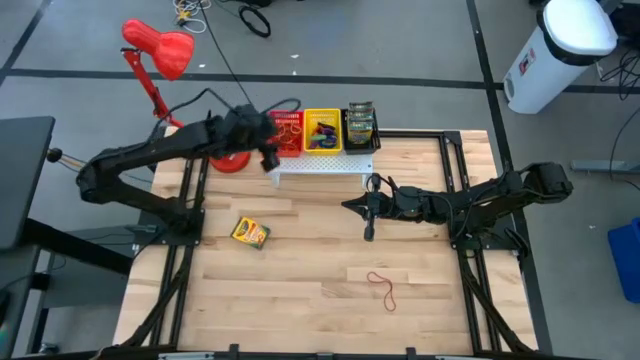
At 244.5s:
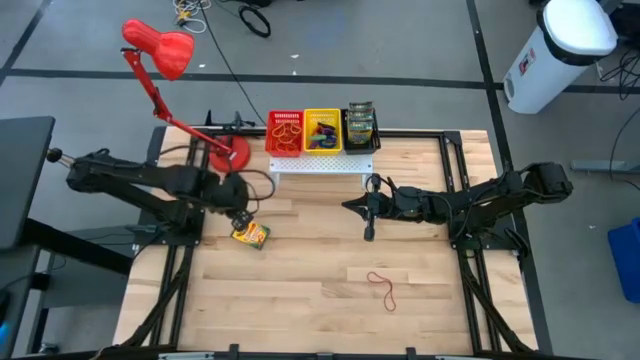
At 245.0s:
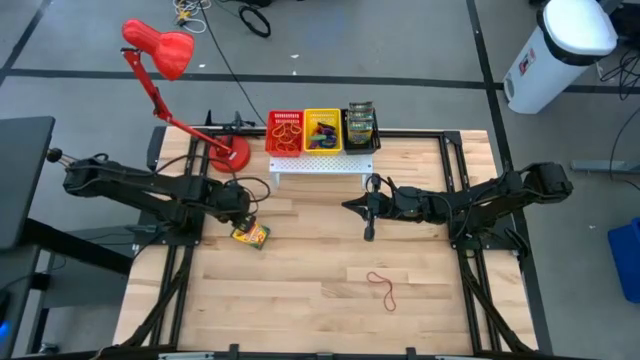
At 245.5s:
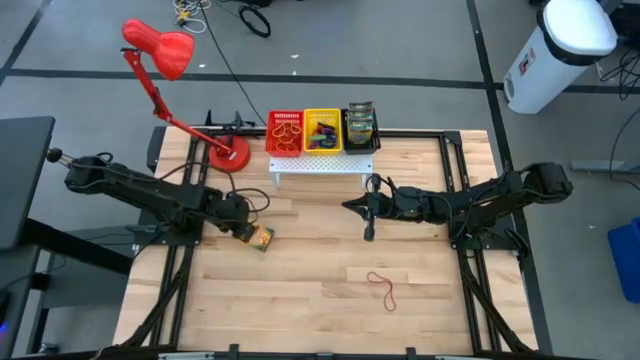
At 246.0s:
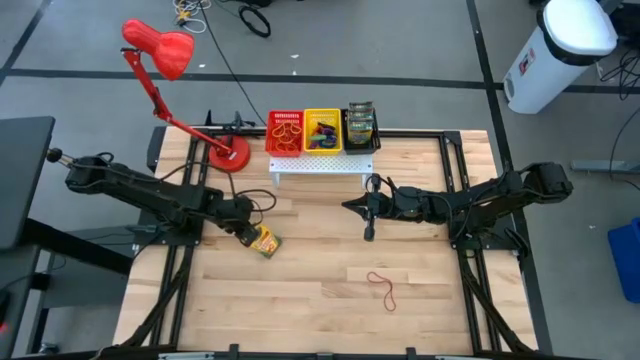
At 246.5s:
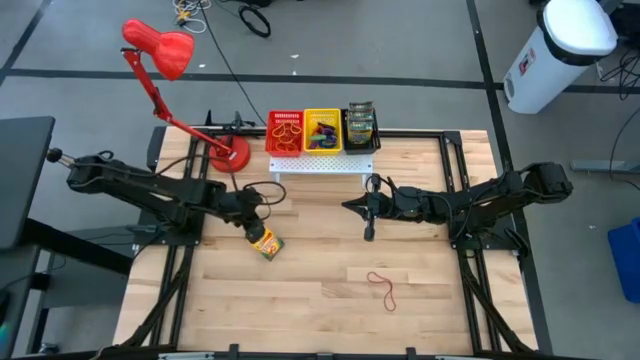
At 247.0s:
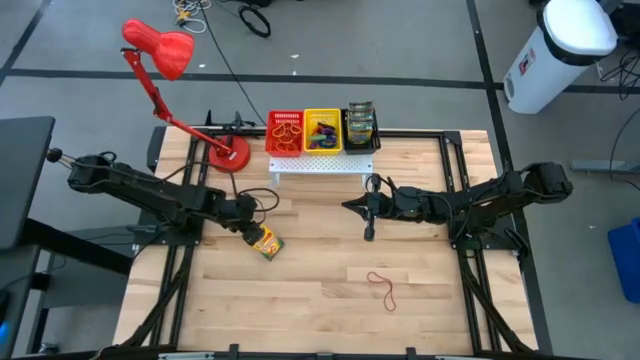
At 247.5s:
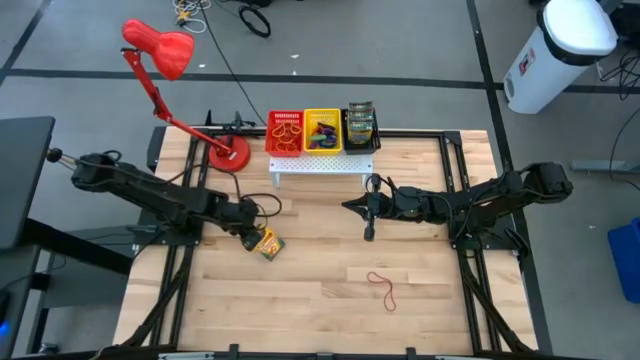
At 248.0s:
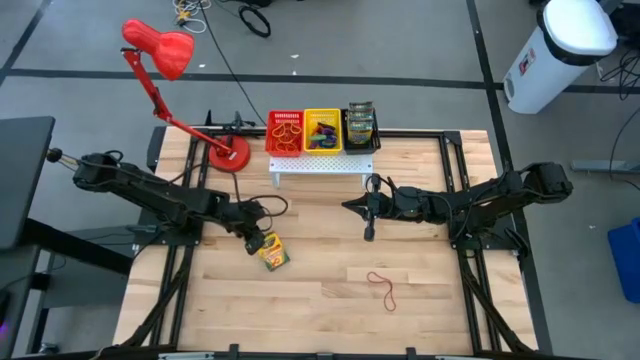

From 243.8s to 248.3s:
Task: Pick & Place Office Desk Supplies
Put the yellow crayon box into the black bin on the shelf

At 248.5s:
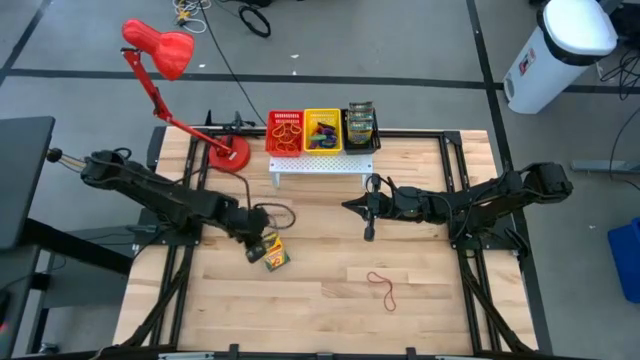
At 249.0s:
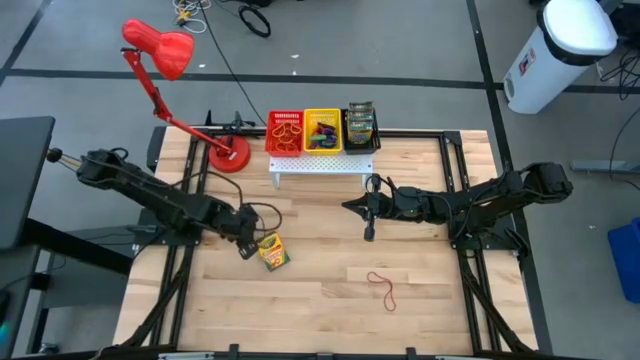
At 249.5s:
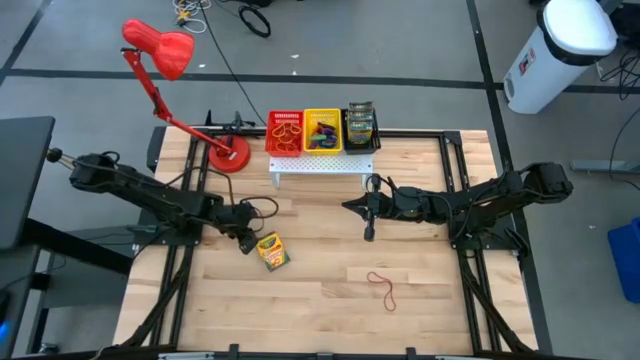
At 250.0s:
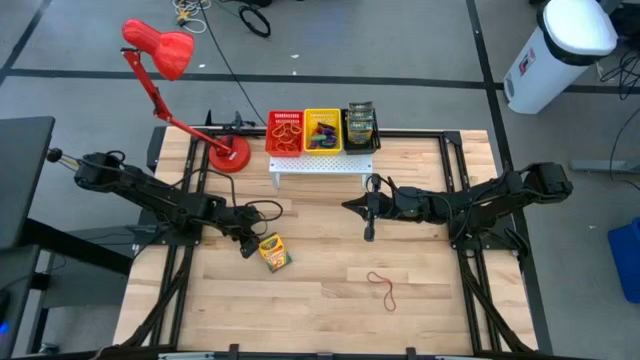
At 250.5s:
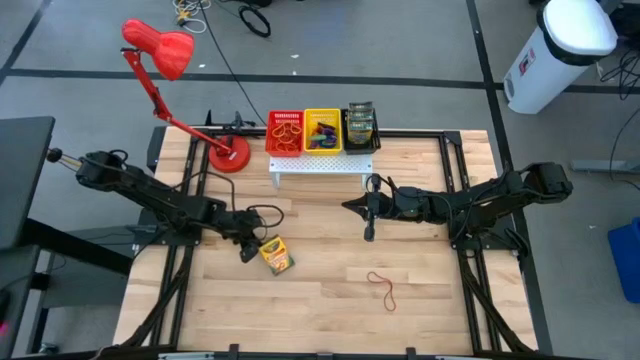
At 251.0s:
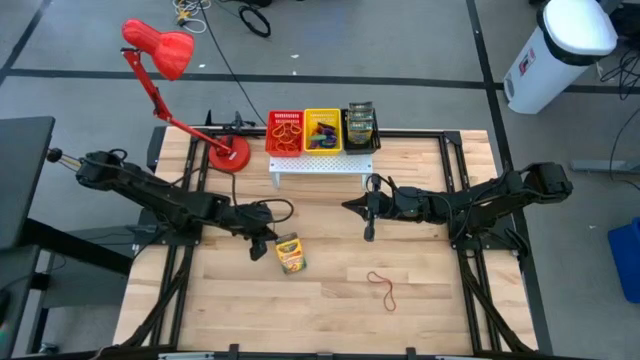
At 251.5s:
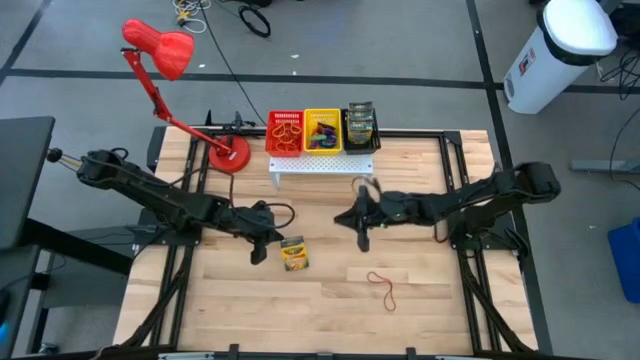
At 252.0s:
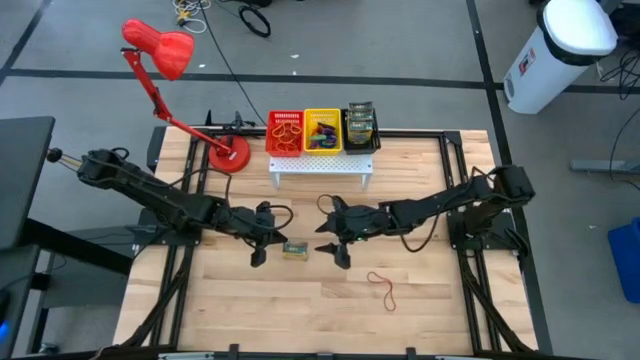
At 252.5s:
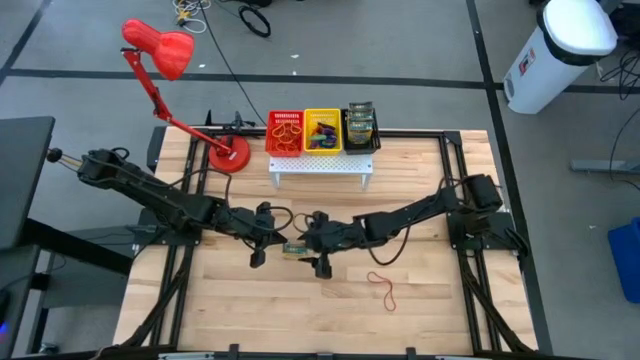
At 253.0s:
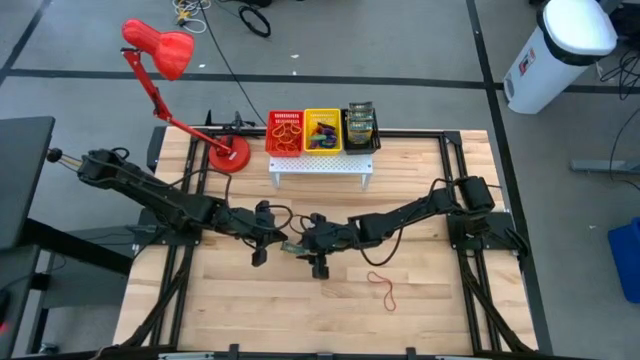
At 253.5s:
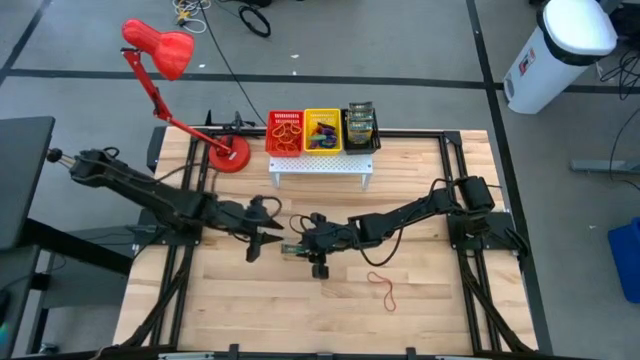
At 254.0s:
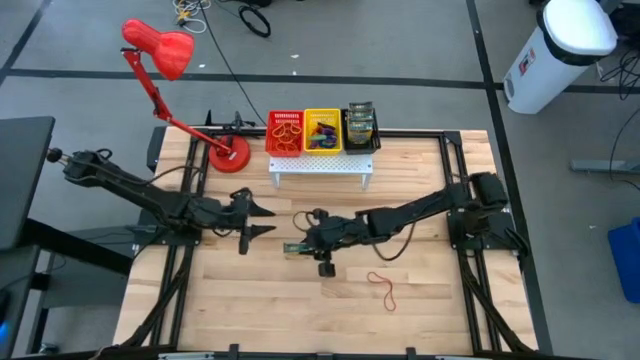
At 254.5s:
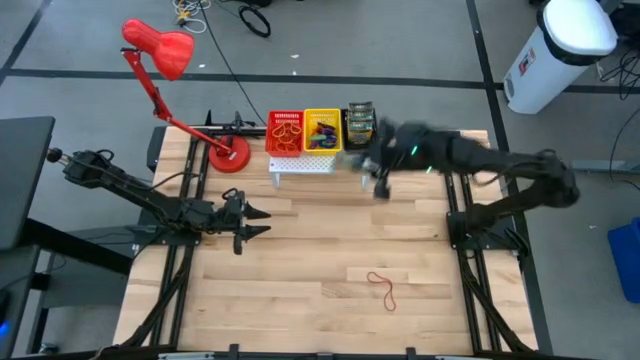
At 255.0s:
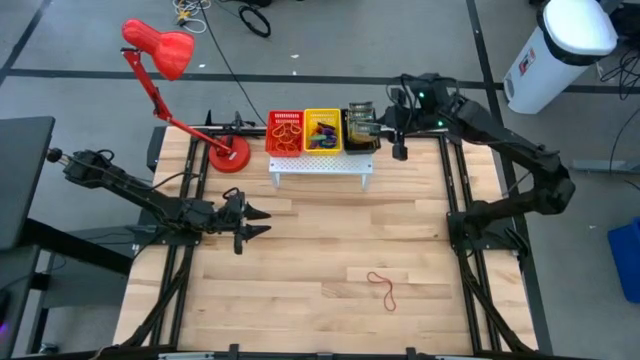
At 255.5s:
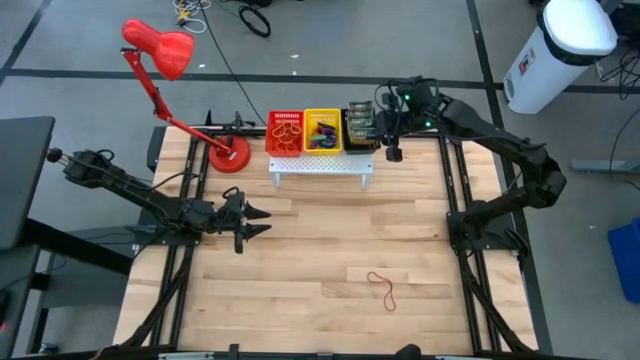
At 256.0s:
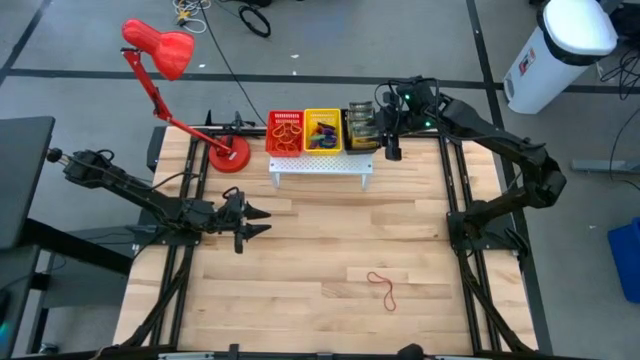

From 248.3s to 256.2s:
Put the yellow crayon box into the black bin on the shelf

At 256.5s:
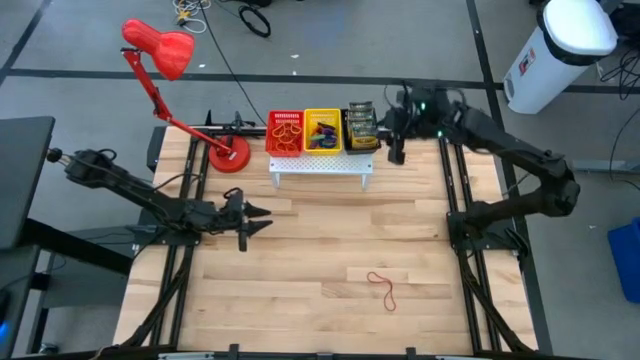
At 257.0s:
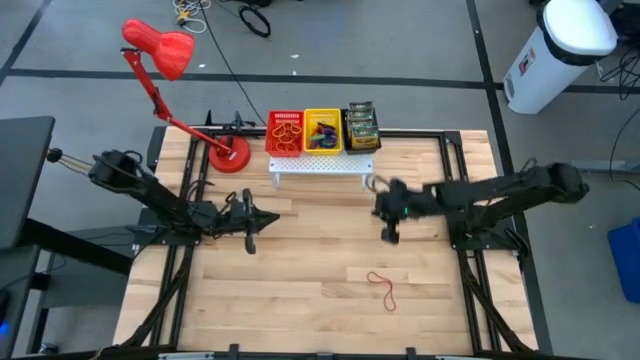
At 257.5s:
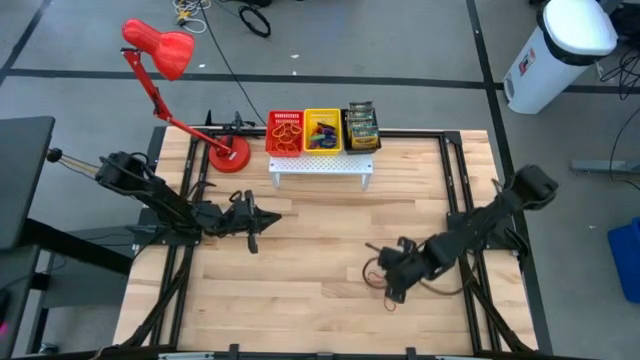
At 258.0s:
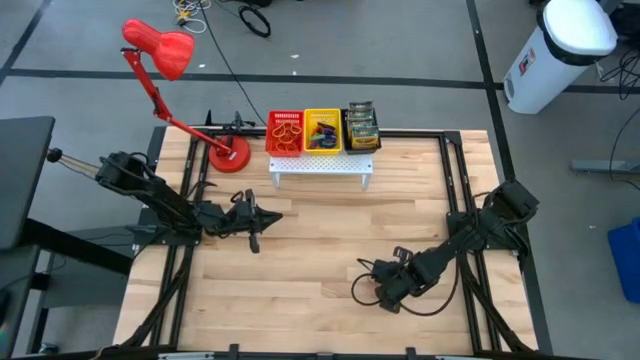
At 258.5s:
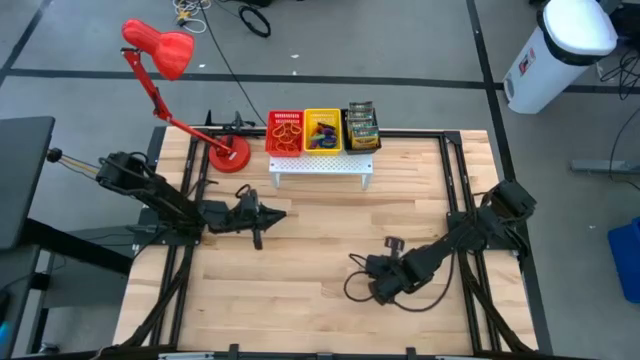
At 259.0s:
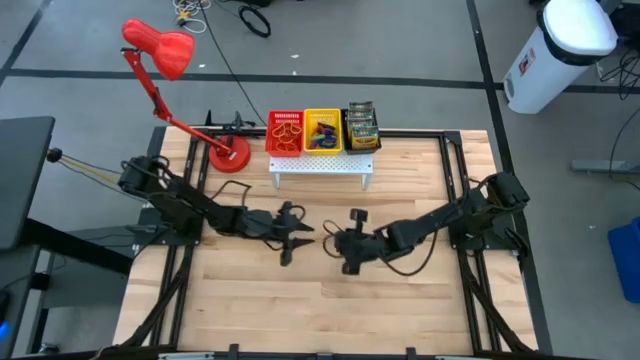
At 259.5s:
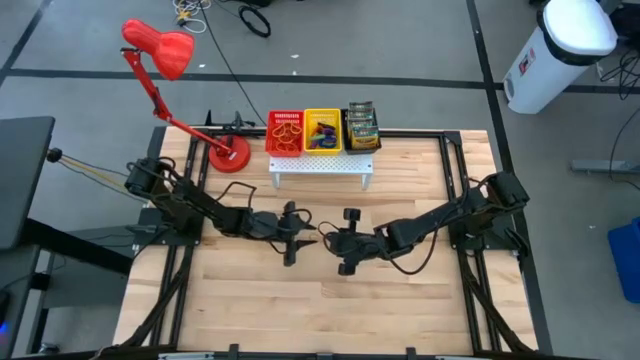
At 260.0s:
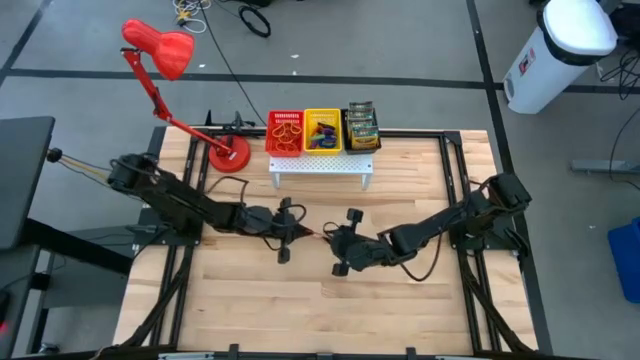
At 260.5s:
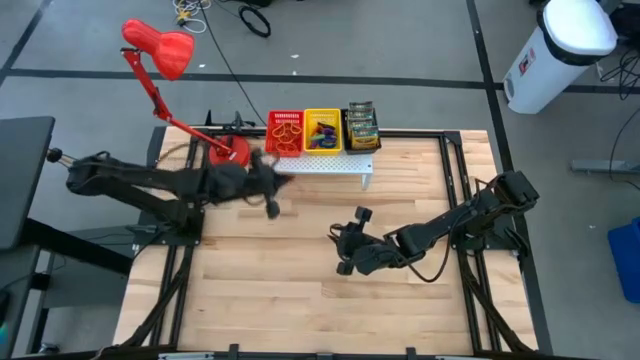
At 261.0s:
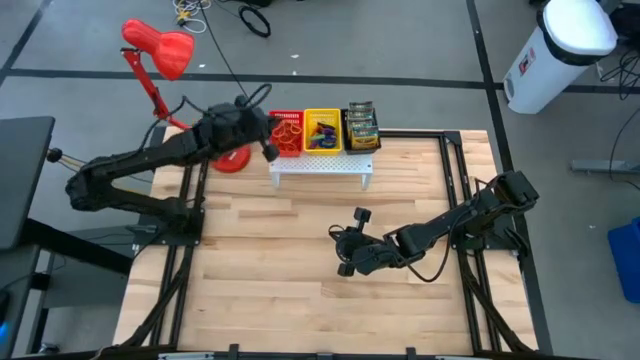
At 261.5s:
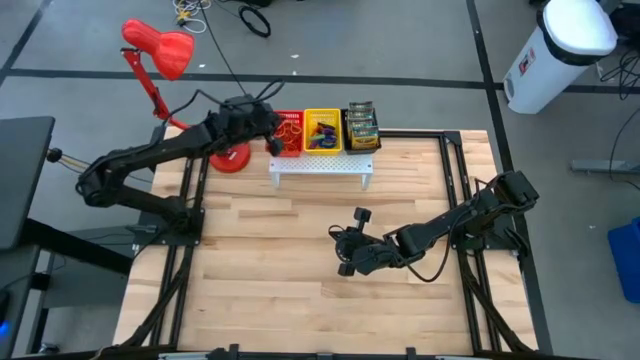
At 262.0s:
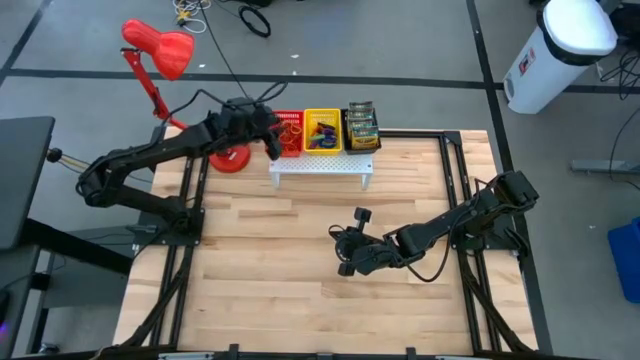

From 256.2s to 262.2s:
Put the red rubber band into the red bin on the shelf

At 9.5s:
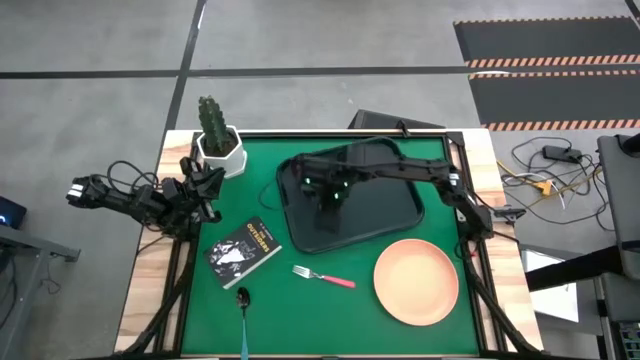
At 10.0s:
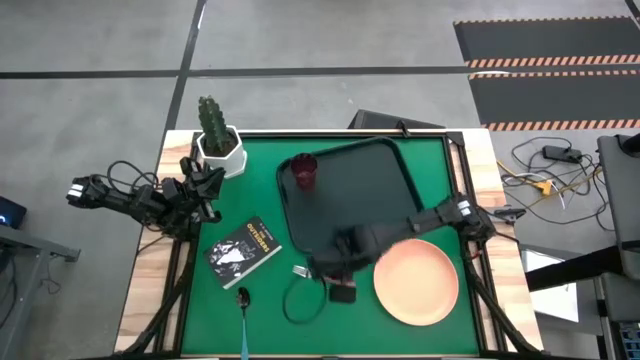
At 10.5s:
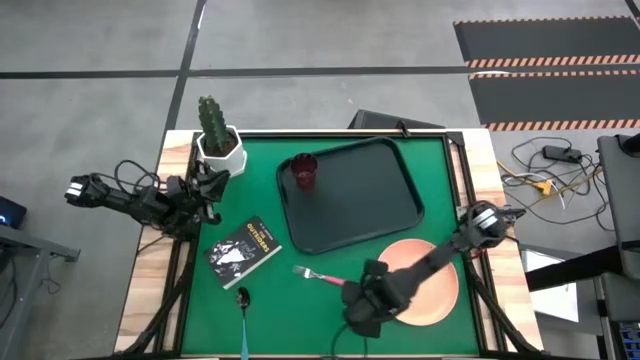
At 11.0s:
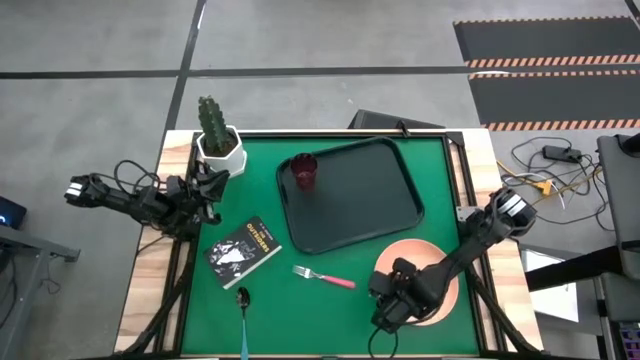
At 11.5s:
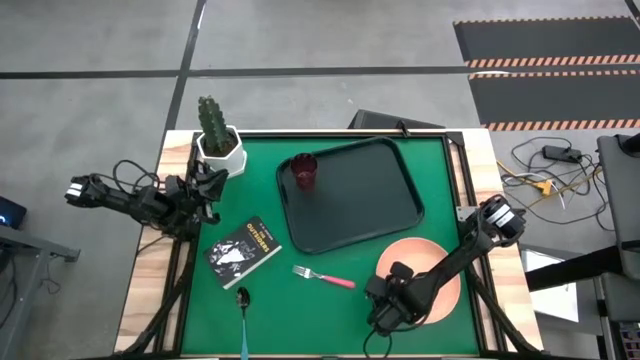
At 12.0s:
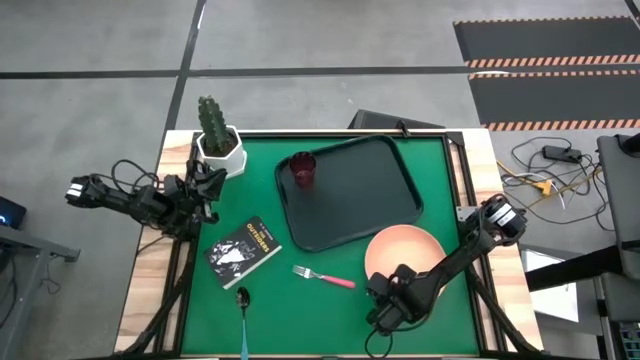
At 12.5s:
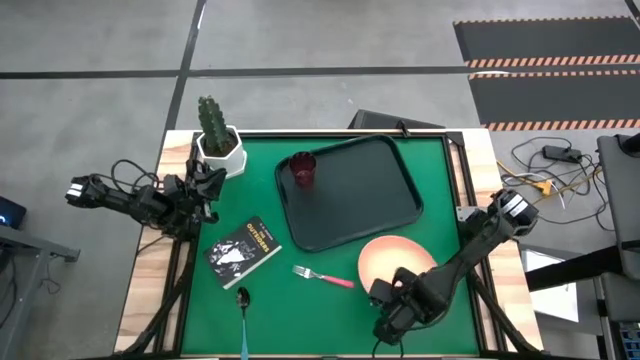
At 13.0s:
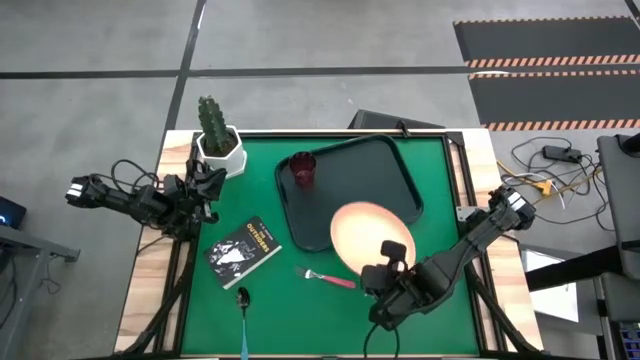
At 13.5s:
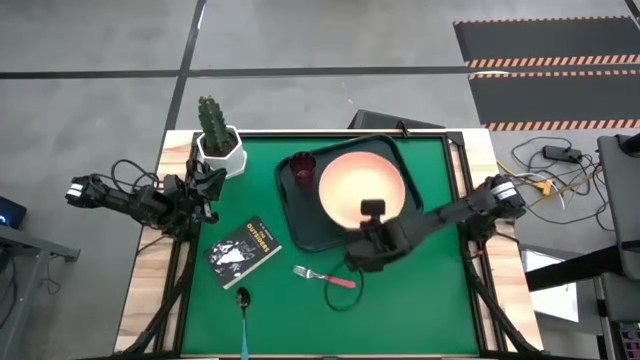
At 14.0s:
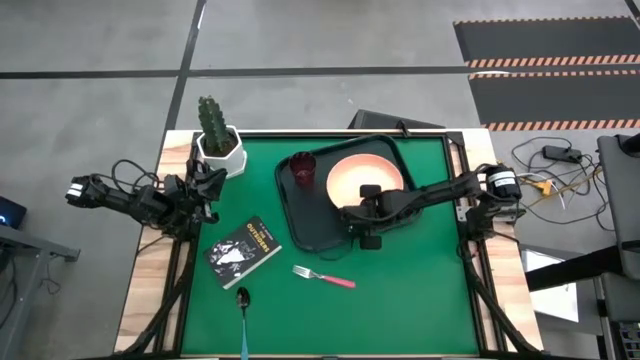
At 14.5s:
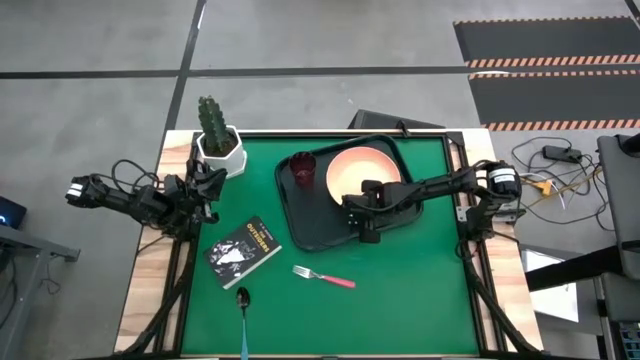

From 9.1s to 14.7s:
Task: Pick and place plate/cup/fork/spoon on tray
Put the pink plate on the black serving tray to the bottom right of the red cup
